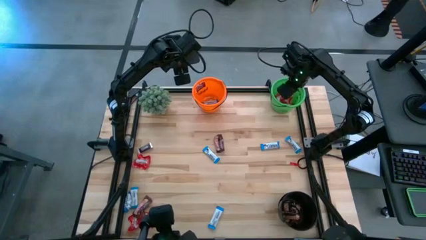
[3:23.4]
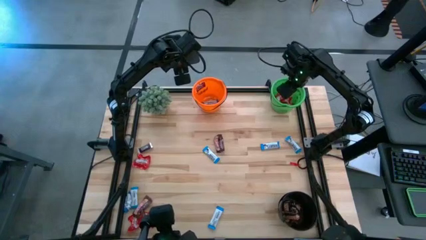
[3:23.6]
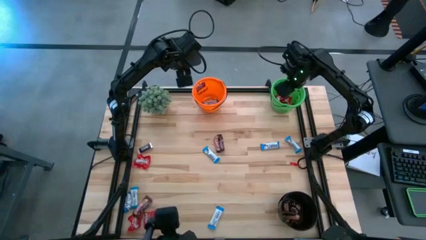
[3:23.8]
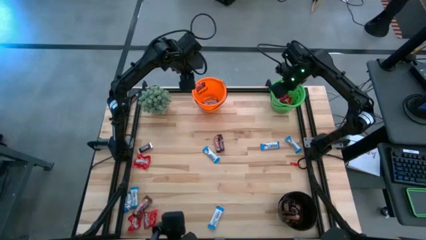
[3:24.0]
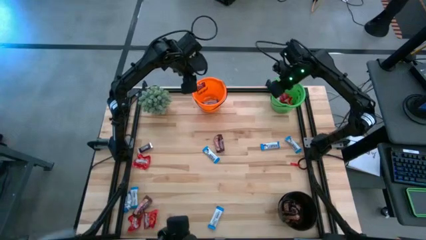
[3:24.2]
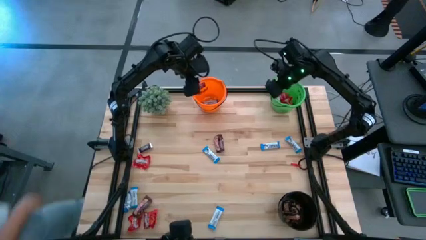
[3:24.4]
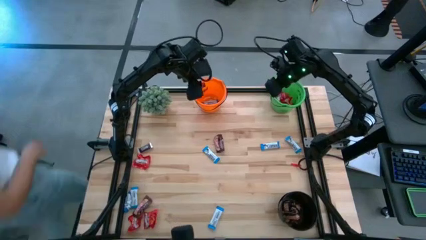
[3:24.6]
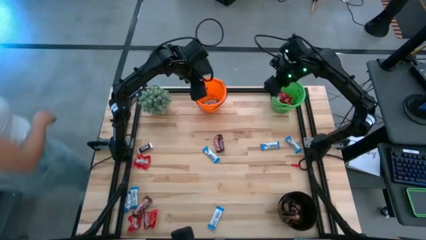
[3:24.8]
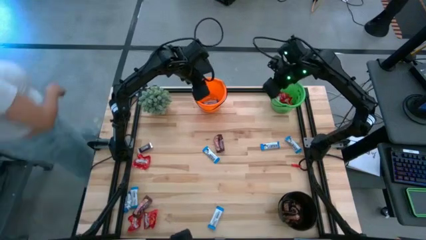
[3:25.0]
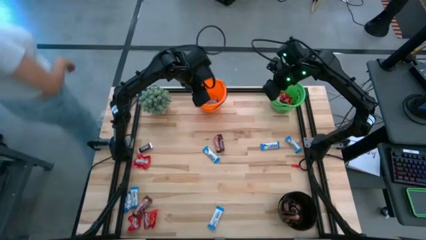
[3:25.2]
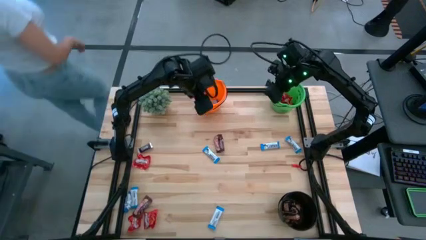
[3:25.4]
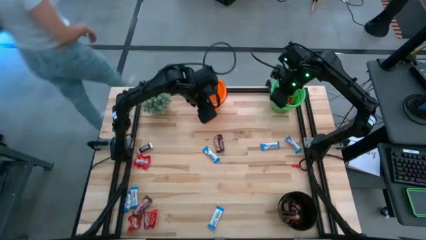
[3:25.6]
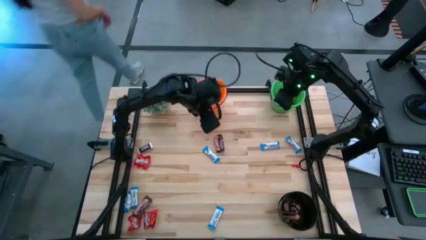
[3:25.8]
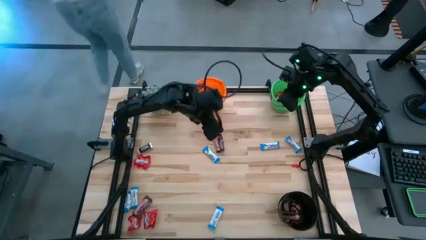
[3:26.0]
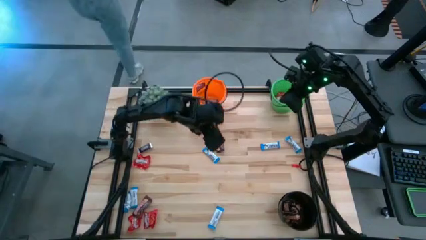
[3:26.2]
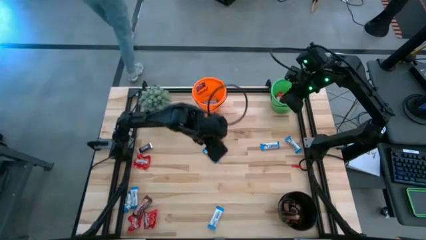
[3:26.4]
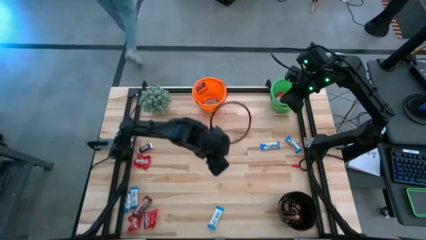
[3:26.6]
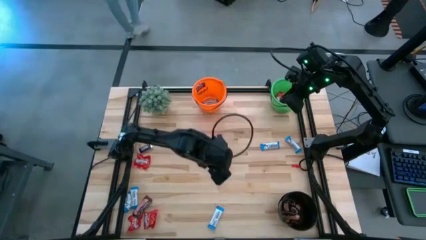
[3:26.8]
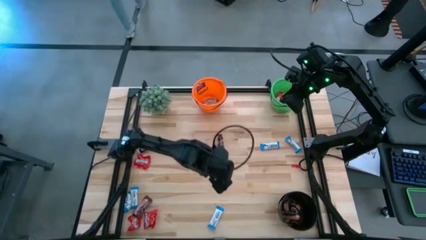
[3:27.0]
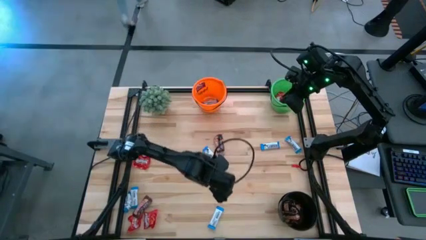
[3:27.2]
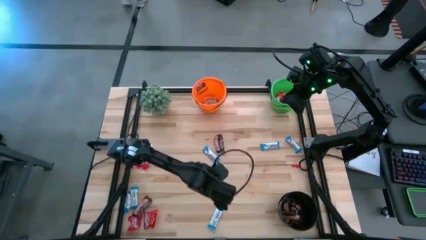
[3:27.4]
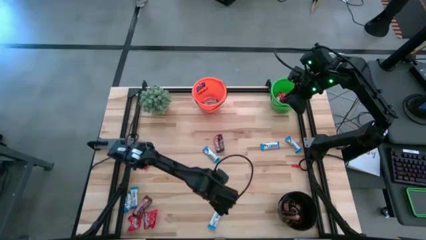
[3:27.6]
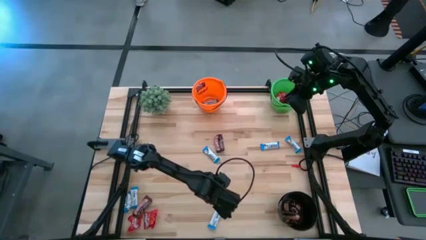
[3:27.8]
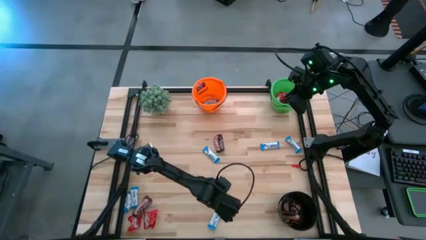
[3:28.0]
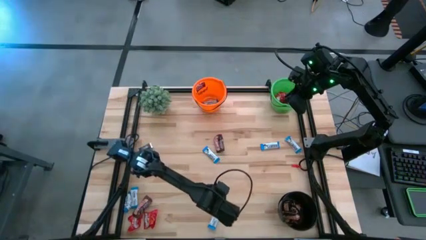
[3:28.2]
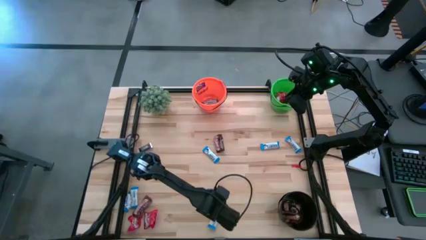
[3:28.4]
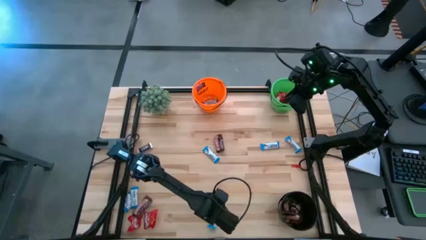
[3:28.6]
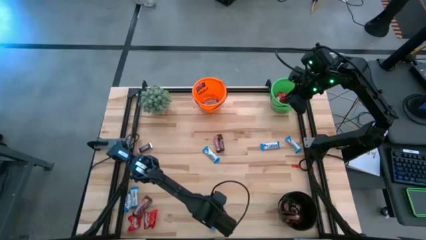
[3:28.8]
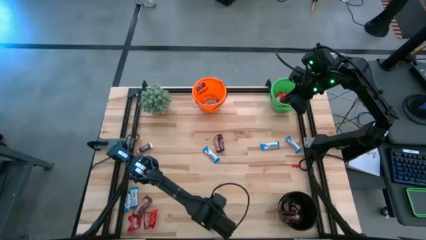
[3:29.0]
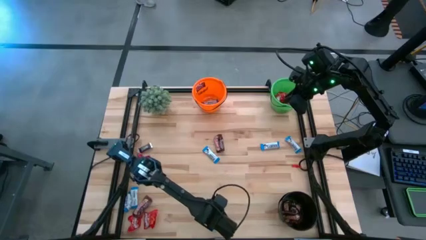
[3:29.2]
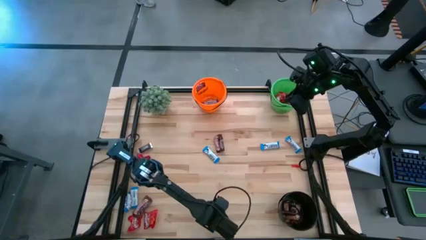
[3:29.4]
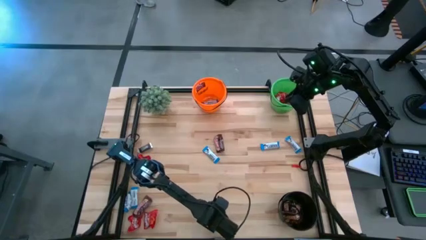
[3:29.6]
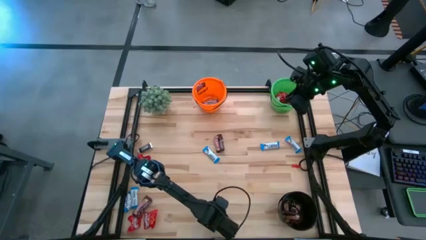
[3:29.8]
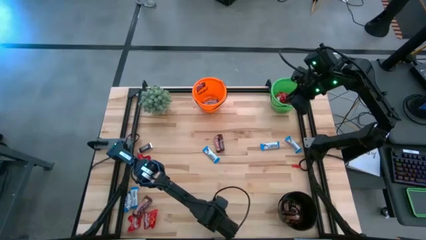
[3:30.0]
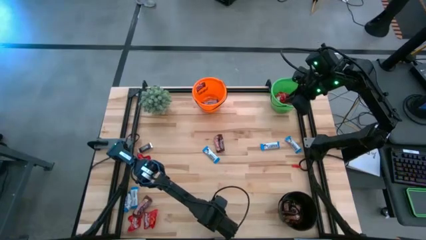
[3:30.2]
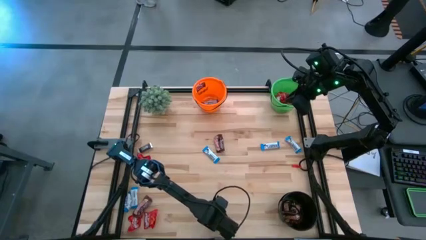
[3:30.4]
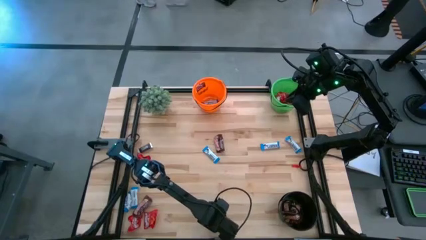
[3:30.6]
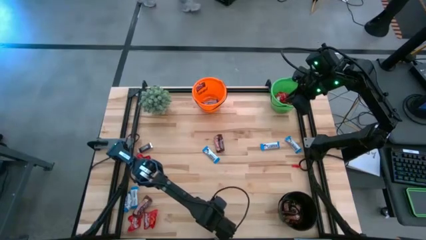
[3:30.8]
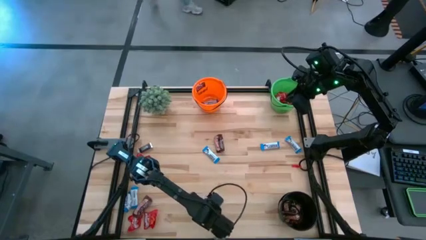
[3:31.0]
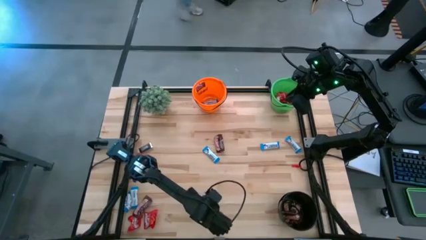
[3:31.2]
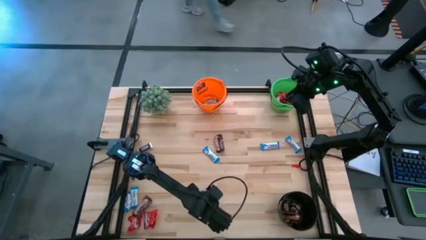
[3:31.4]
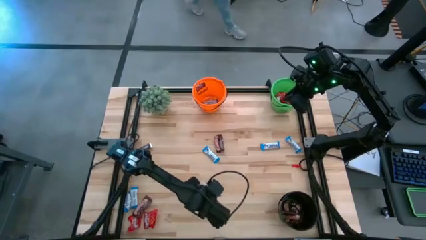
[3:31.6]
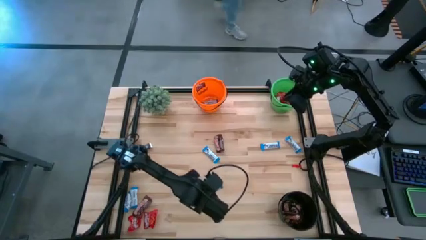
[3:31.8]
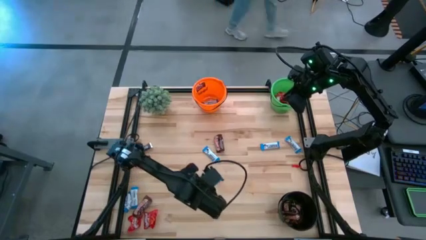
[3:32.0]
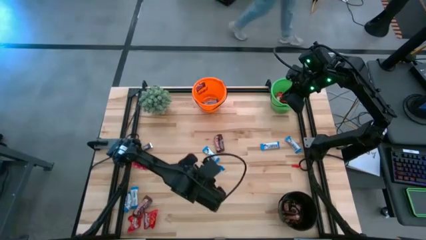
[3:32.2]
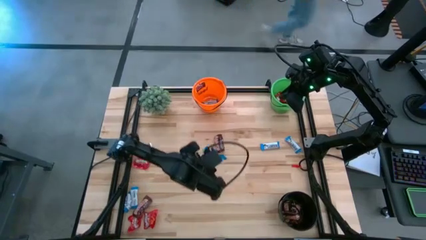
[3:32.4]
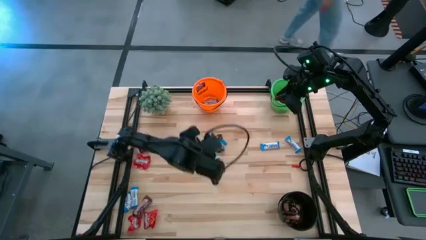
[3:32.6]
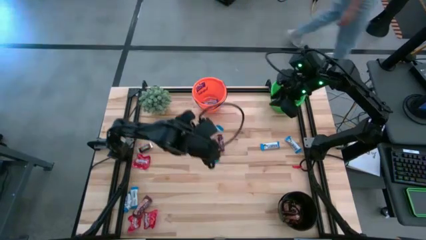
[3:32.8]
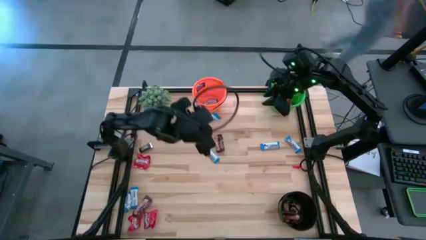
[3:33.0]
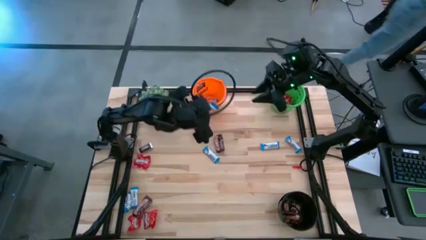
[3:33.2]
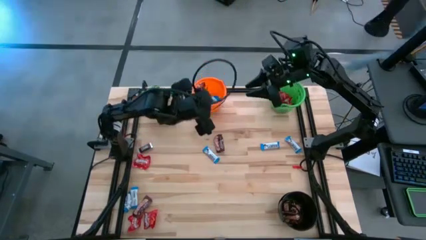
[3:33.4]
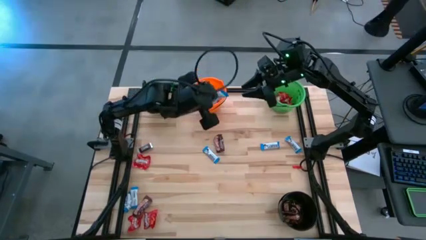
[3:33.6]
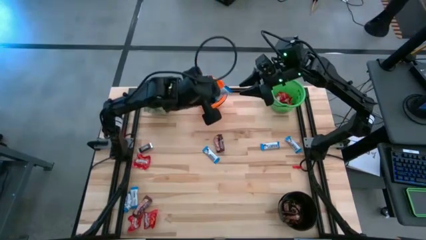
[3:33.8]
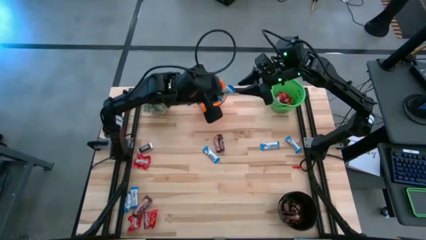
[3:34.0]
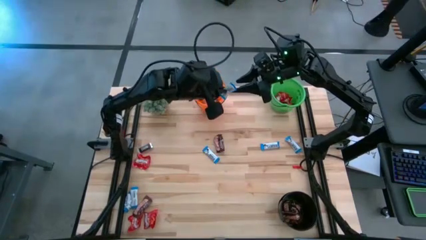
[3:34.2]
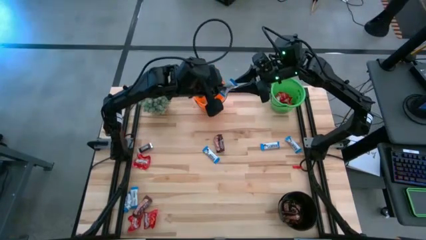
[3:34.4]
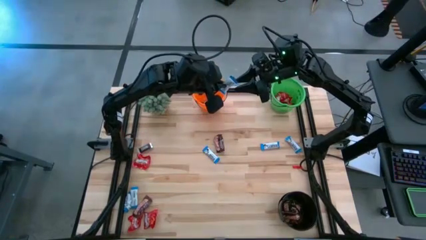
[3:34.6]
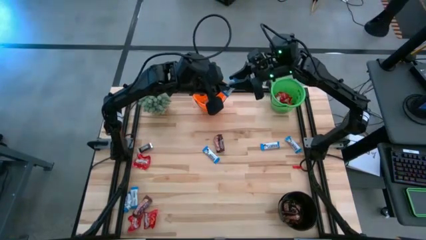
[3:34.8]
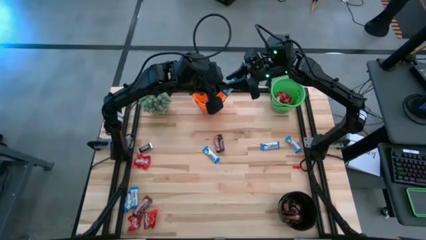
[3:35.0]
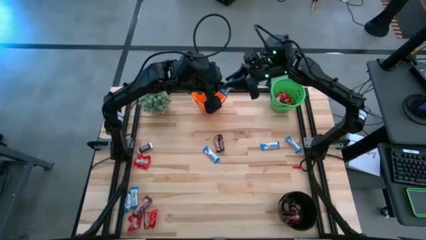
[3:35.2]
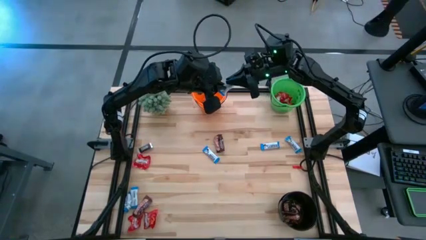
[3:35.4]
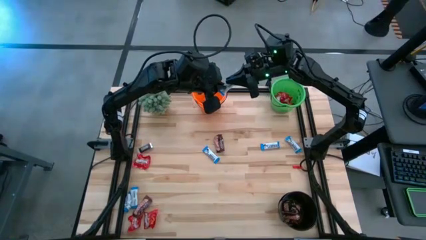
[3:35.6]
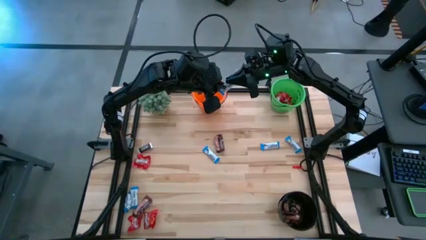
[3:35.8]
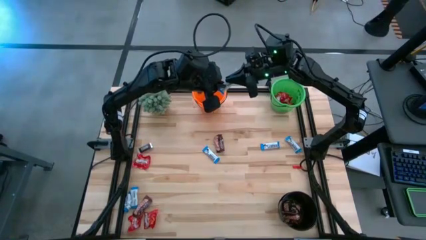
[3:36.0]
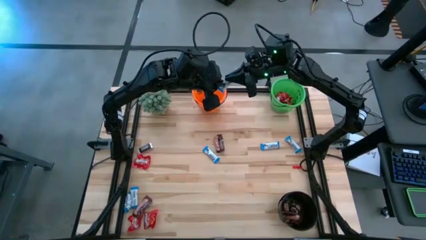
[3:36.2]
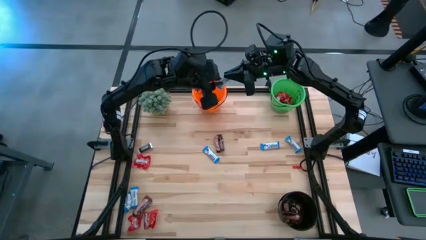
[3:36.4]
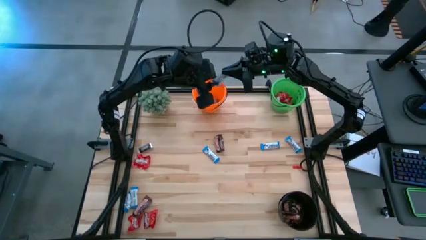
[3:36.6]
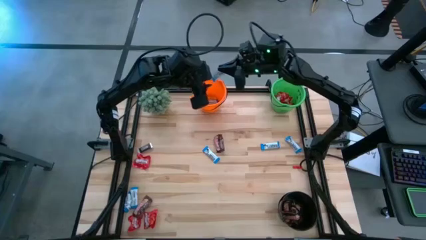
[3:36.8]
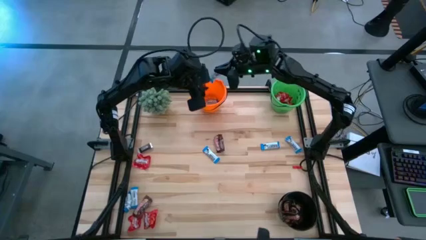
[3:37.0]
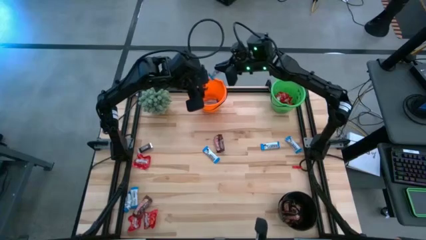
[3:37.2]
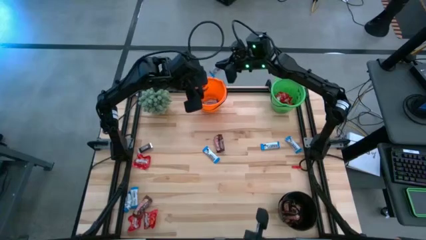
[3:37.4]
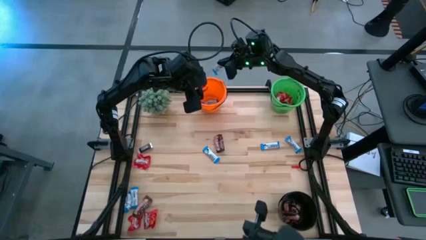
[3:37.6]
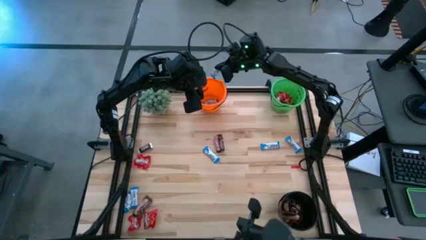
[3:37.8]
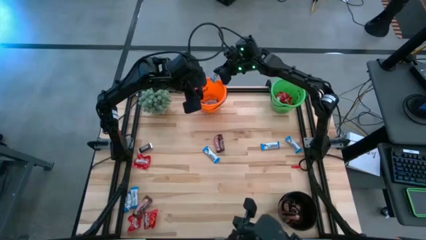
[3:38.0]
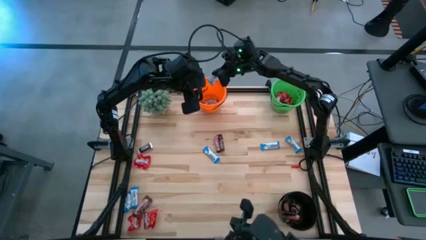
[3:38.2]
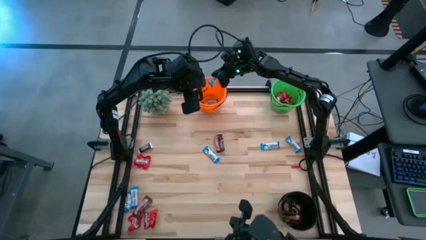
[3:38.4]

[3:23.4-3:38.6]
Task: Organize candy in baskets
Put the white chocolate bar into the orange bucket
